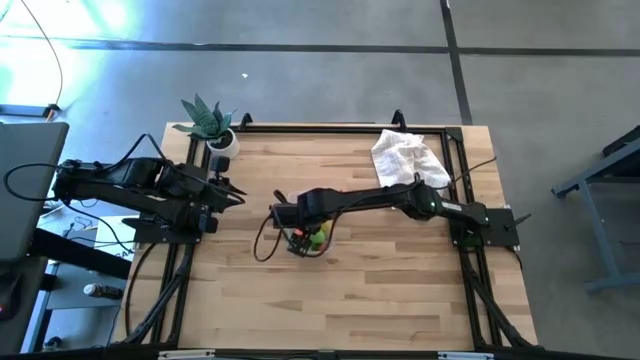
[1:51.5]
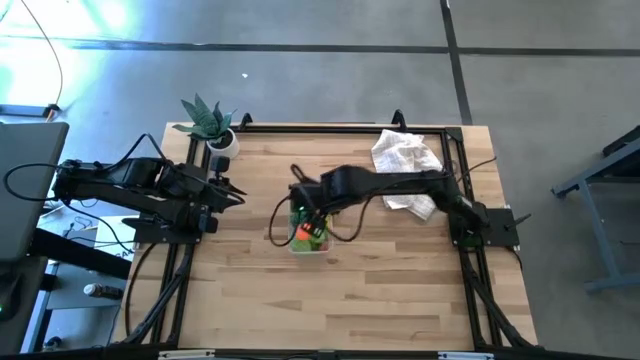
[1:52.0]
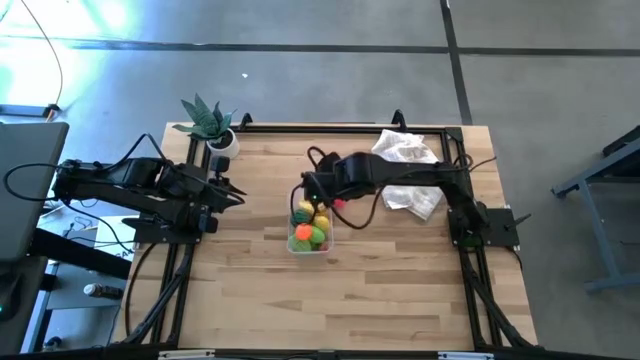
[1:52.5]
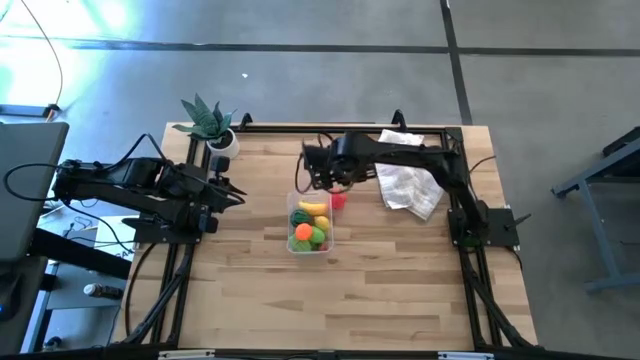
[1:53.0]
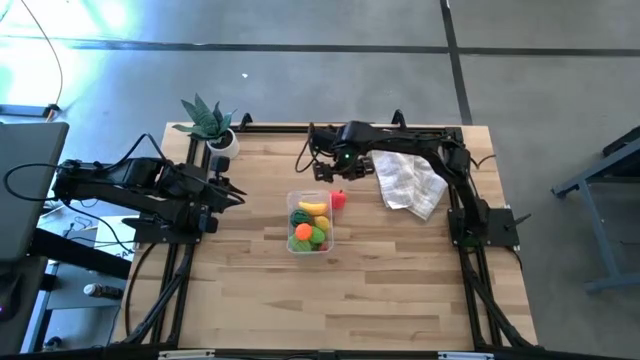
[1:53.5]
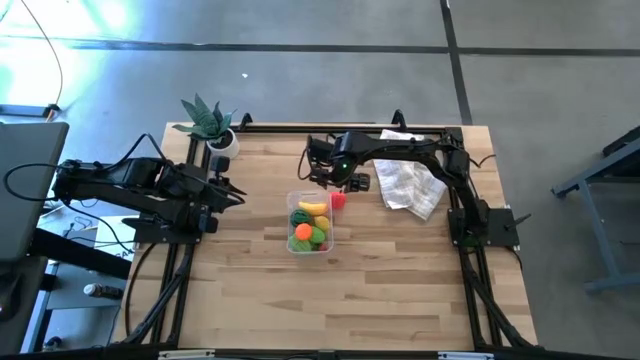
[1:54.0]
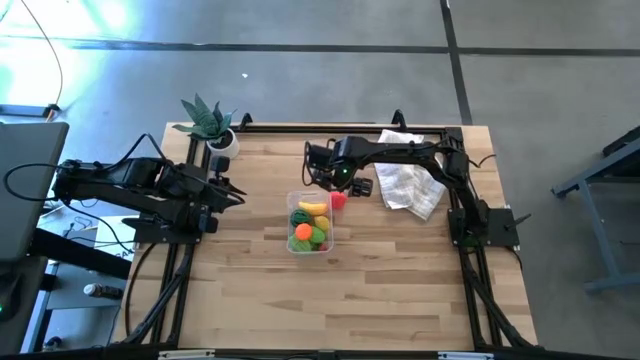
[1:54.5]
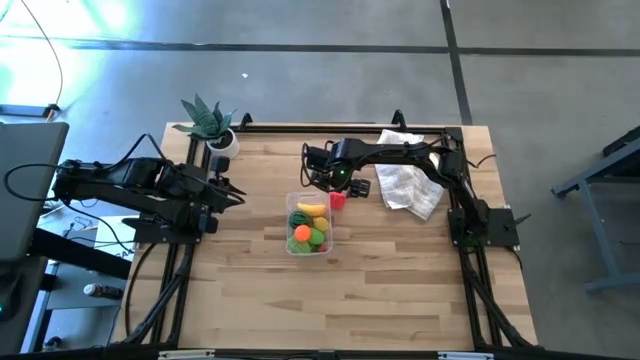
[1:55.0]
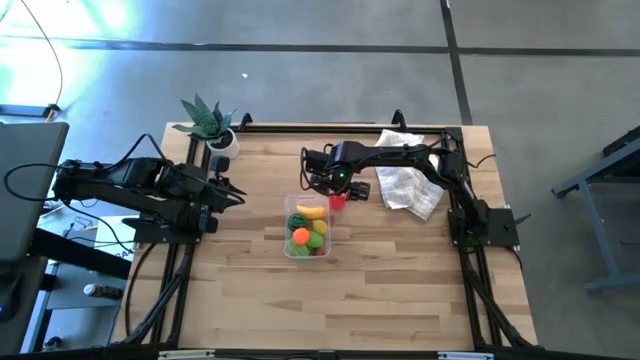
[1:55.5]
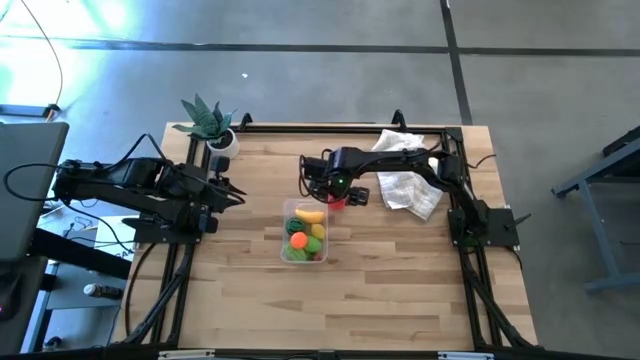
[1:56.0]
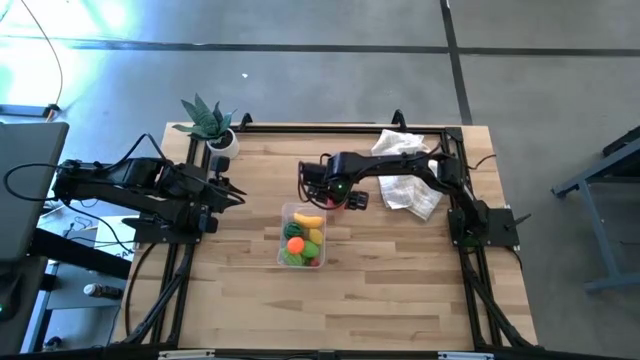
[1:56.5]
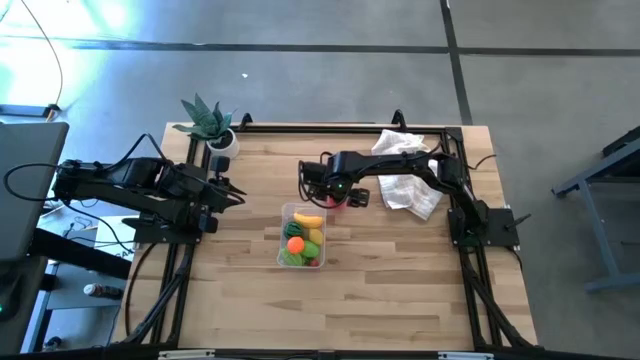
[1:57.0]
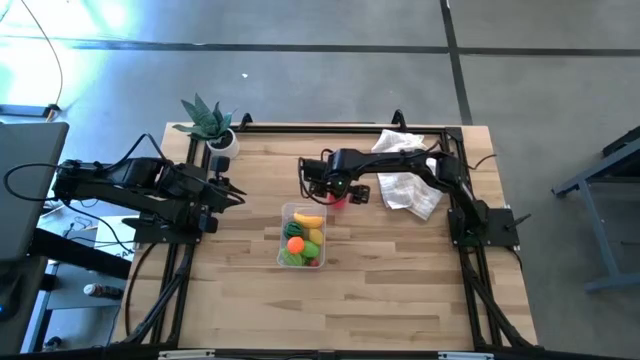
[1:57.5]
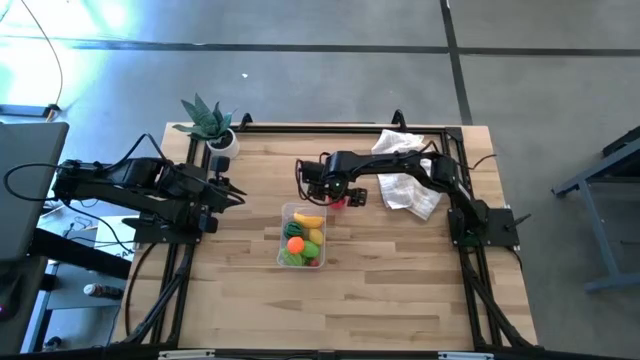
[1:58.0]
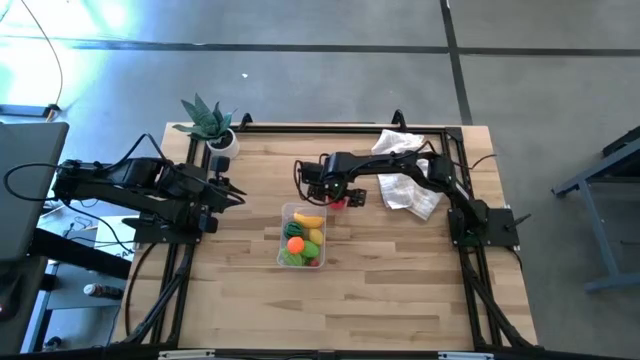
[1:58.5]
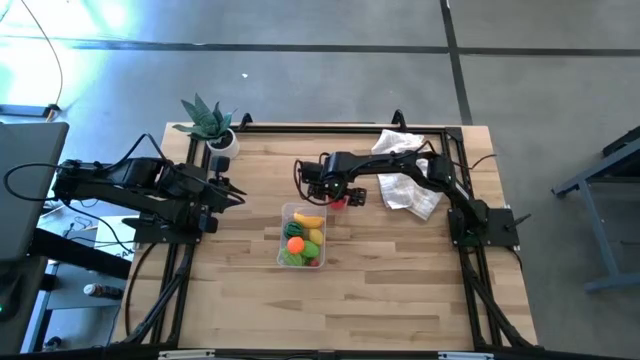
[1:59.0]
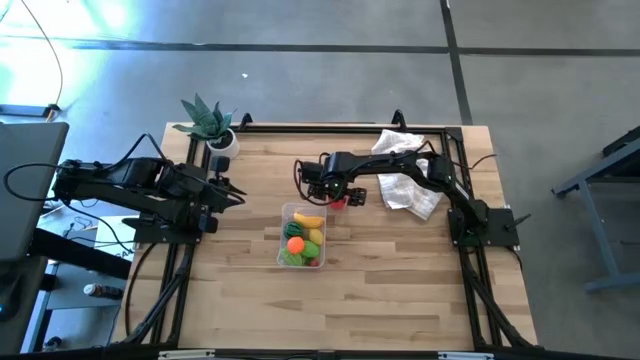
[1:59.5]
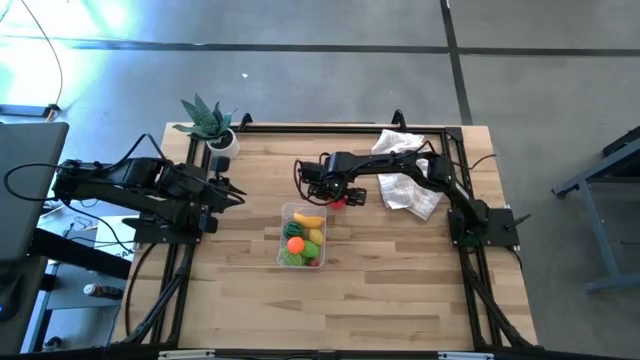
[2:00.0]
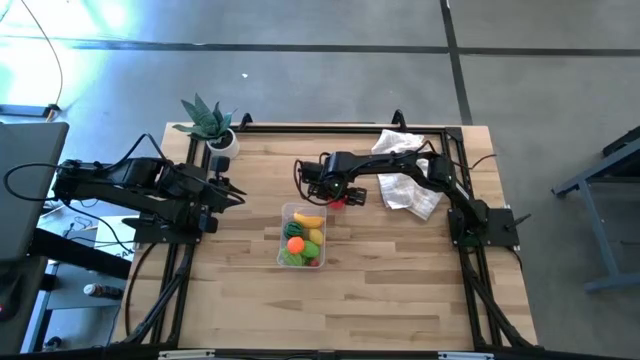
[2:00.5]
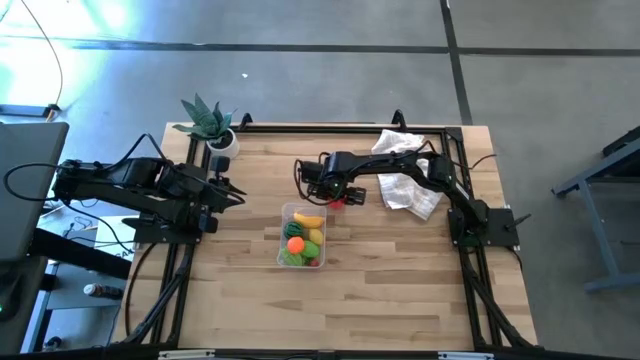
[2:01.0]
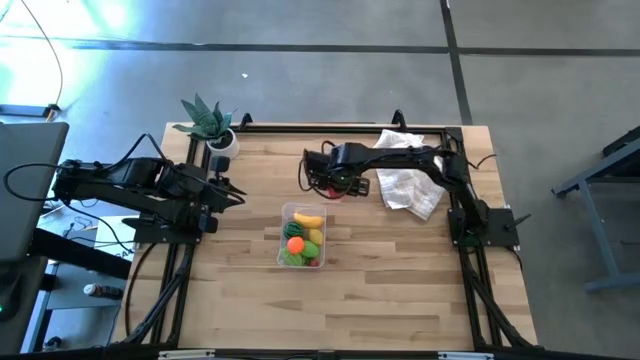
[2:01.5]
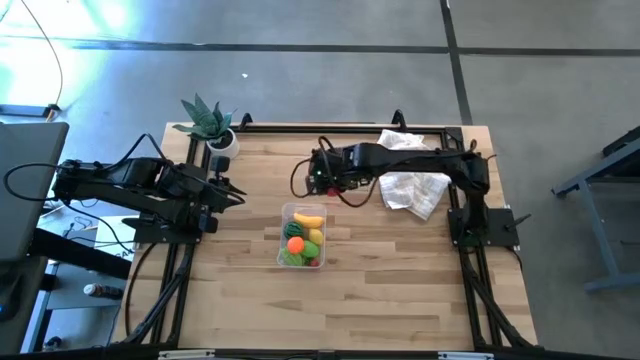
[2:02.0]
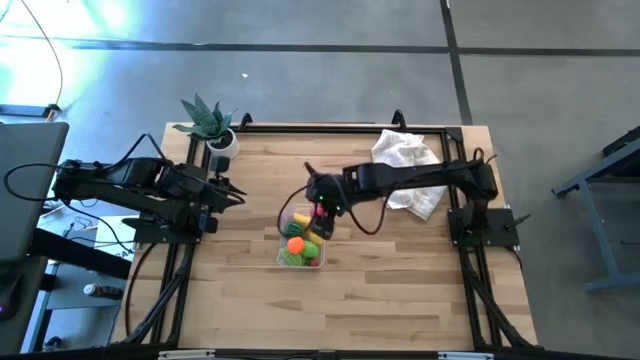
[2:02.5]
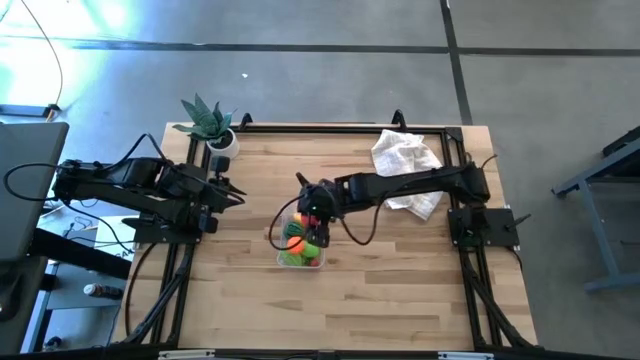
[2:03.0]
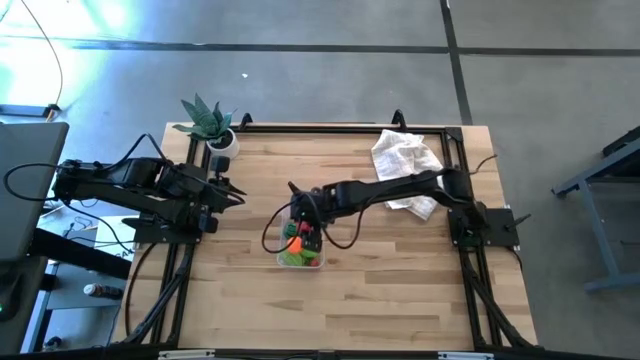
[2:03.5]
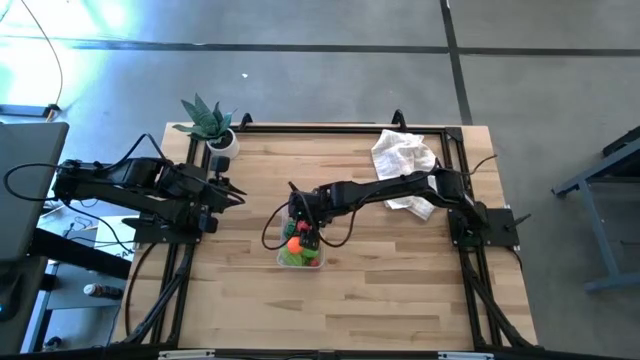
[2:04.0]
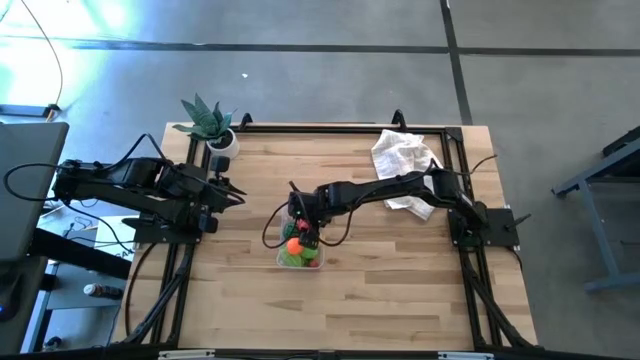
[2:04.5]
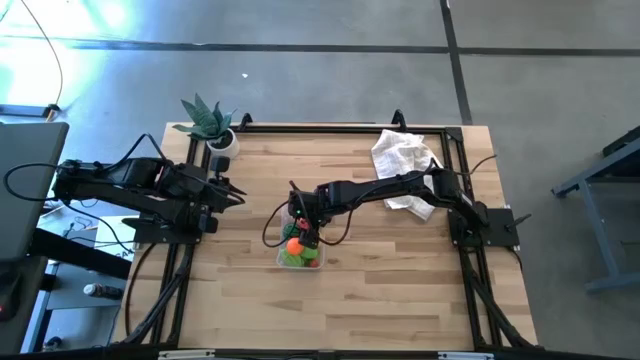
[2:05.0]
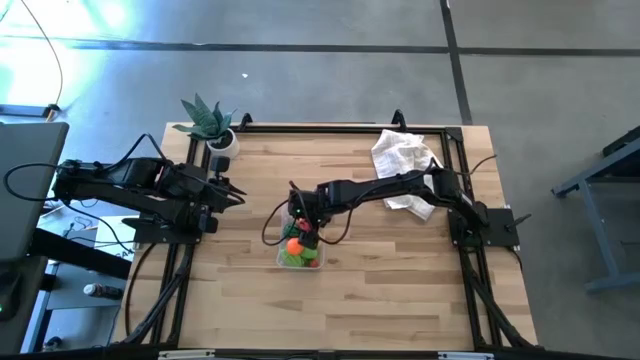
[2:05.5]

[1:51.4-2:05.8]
Task: Pick and placing Produce into tupperware
Put the apple into the bin

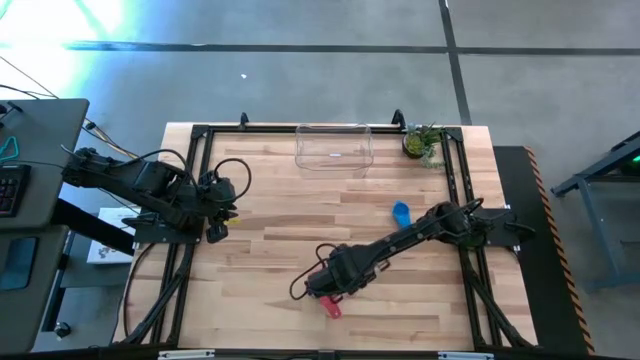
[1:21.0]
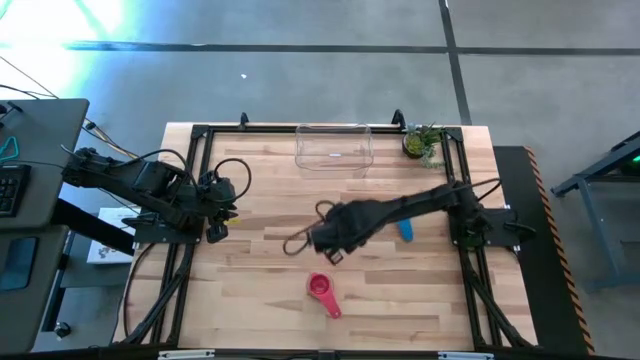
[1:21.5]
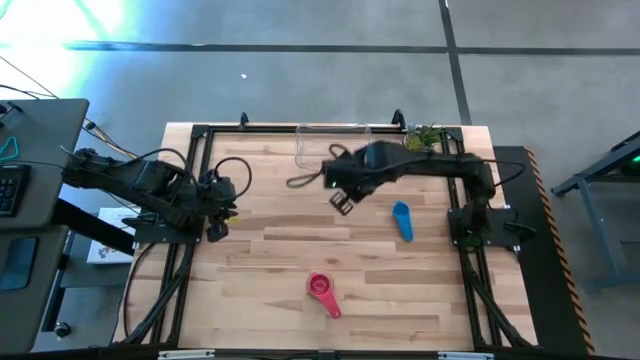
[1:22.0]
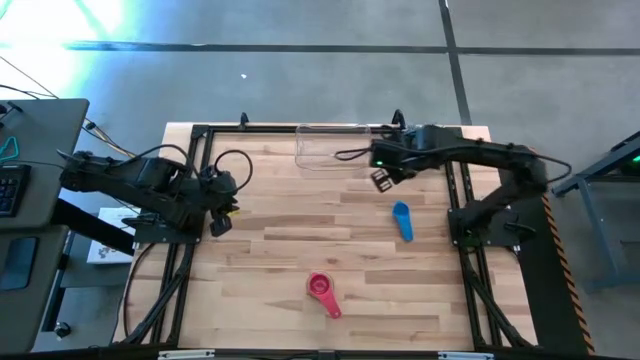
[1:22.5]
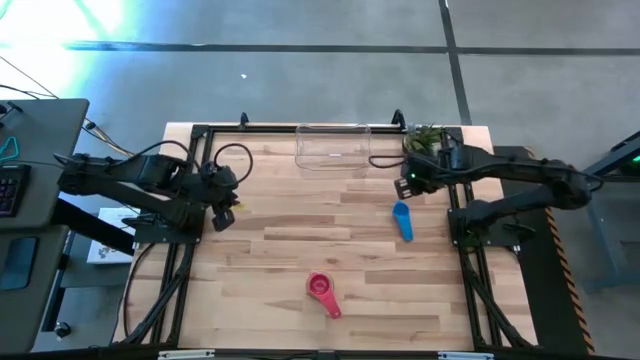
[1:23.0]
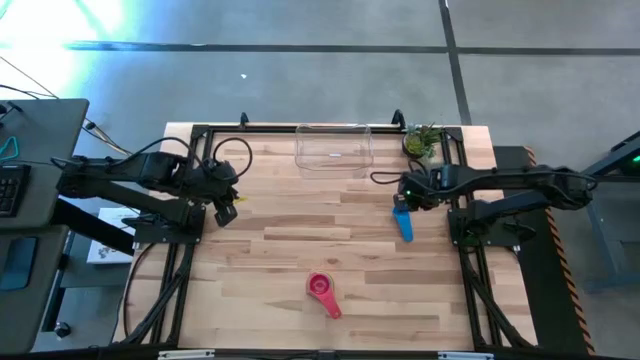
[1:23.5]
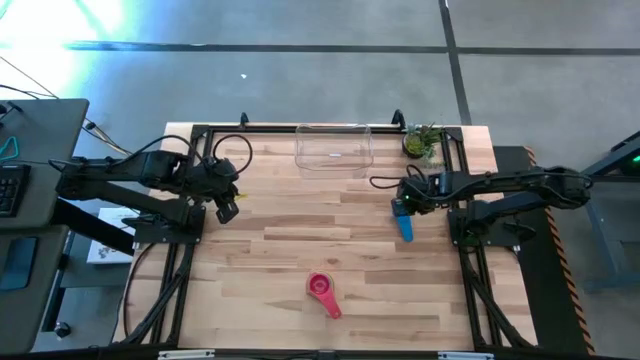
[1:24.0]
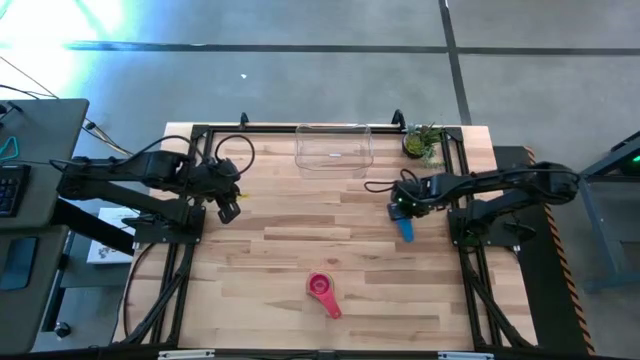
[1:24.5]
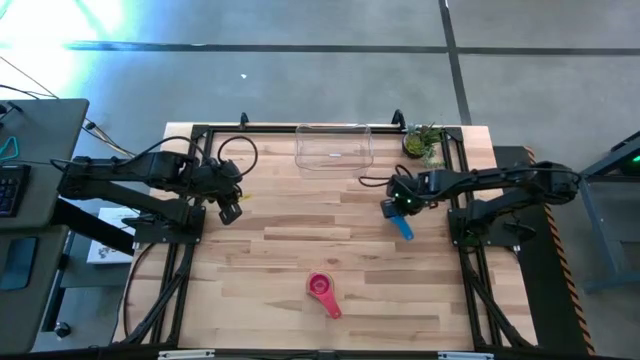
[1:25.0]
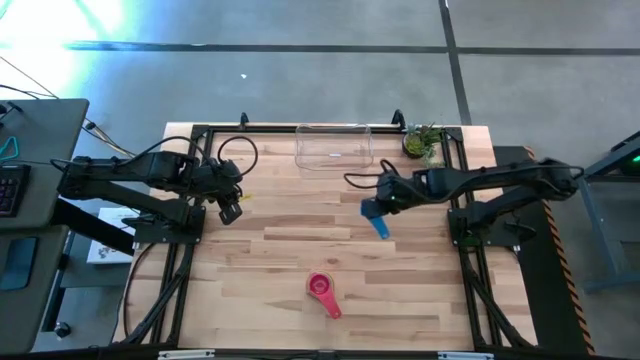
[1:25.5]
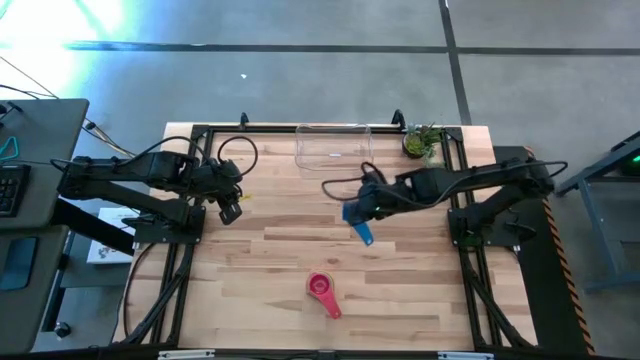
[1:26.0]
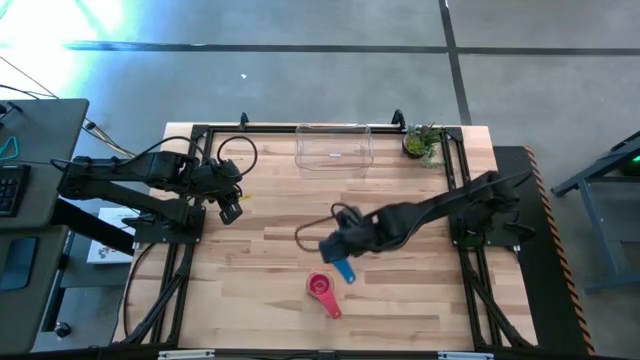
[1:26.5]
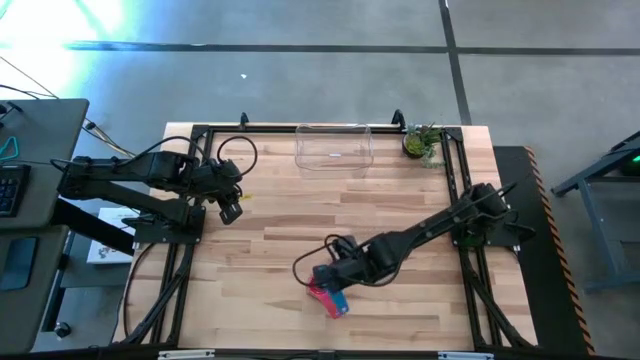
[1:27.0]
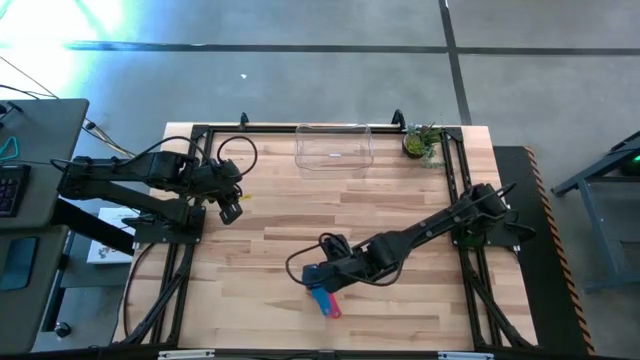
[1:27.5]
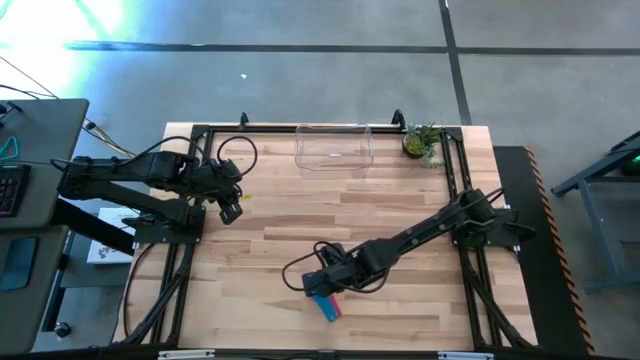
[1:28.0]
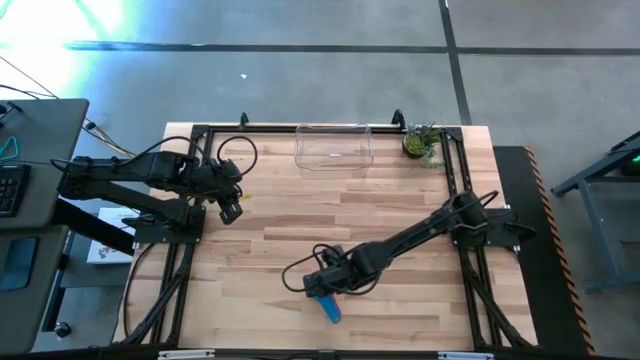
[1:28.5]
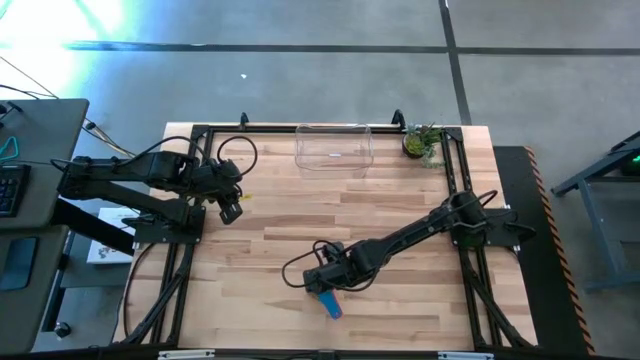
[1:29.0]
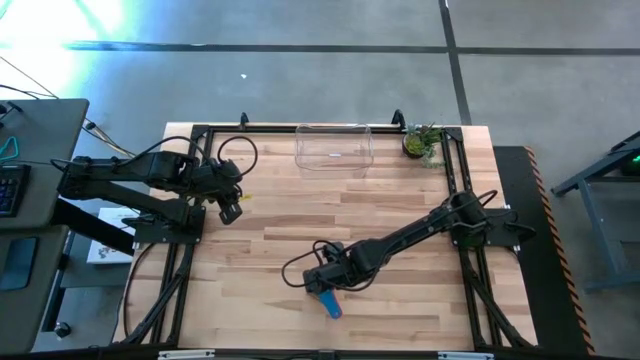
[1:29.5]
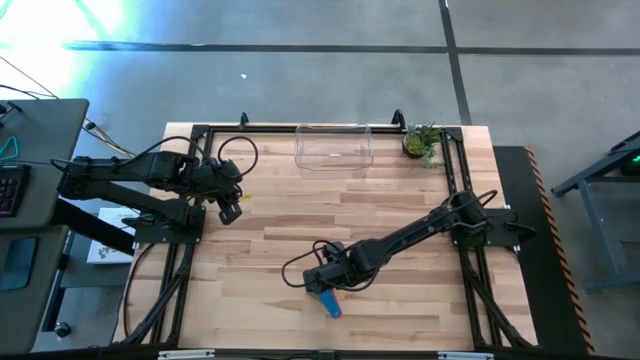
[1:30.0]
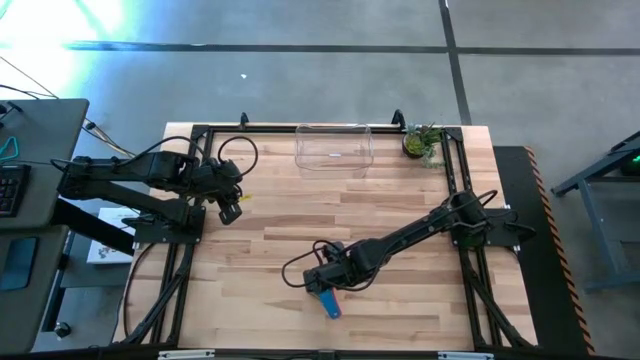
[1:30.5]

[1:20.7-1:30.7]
Task: Nest measuring cups in basket
Stack the blue measuring cup on the pink measuring cup
